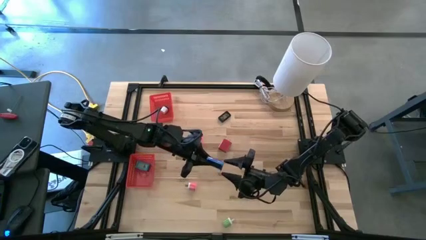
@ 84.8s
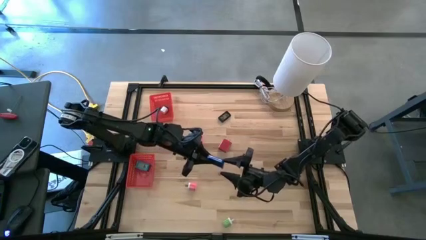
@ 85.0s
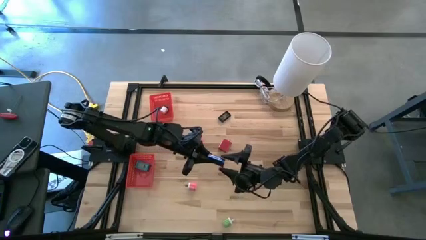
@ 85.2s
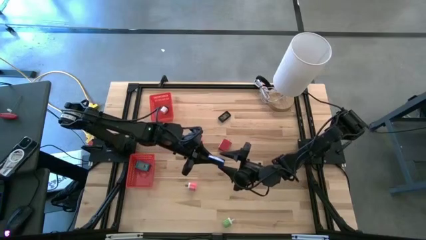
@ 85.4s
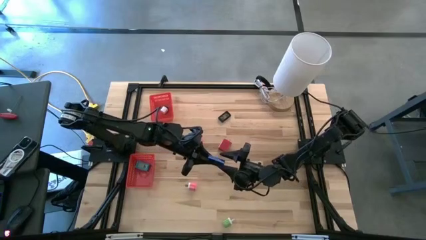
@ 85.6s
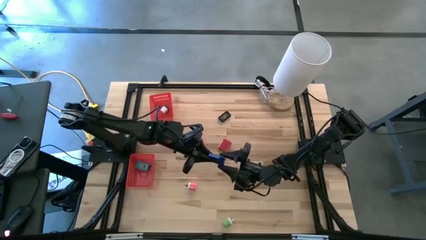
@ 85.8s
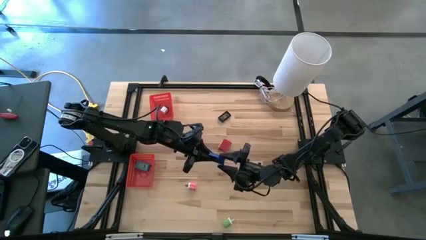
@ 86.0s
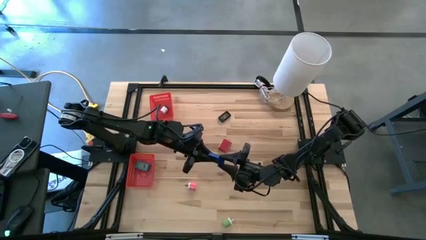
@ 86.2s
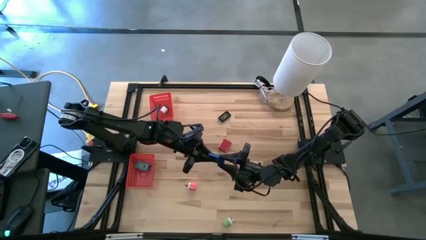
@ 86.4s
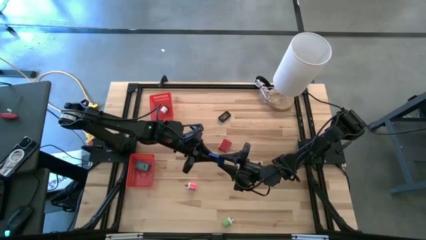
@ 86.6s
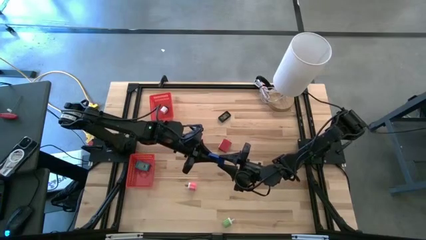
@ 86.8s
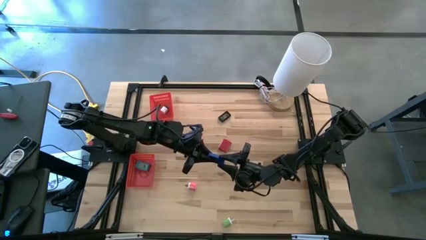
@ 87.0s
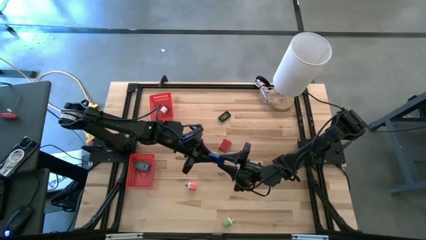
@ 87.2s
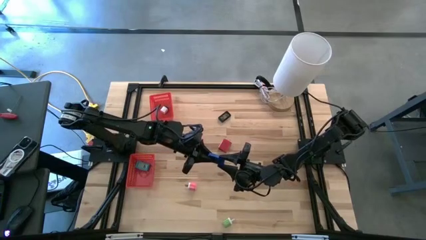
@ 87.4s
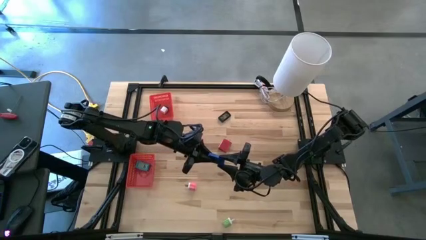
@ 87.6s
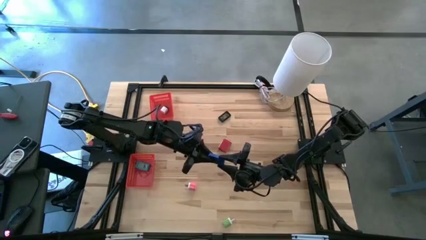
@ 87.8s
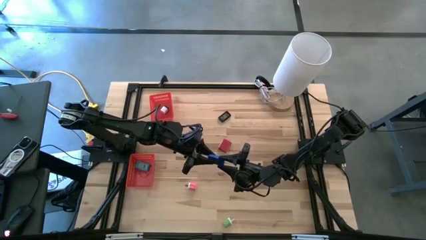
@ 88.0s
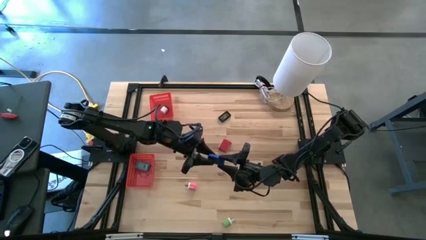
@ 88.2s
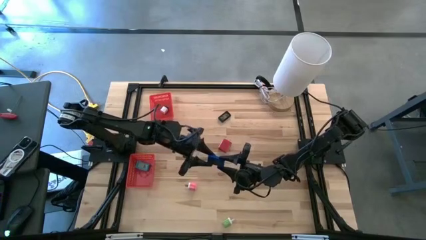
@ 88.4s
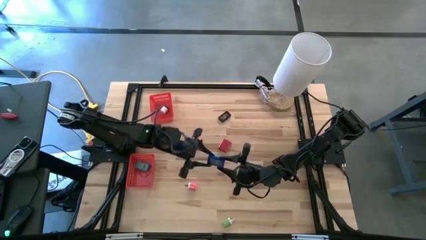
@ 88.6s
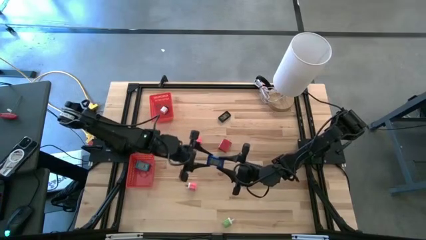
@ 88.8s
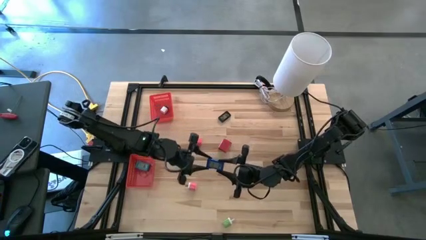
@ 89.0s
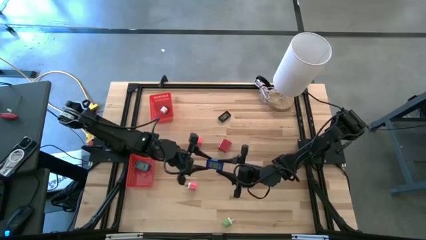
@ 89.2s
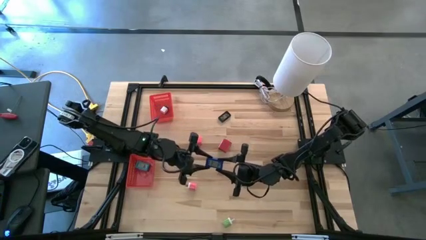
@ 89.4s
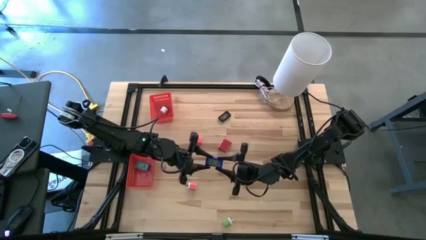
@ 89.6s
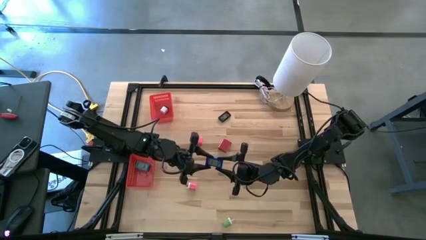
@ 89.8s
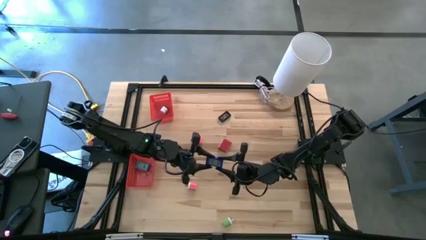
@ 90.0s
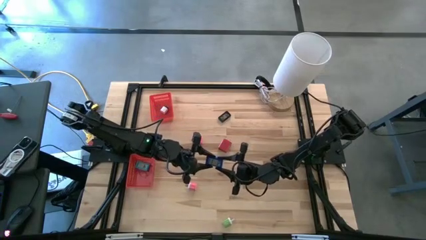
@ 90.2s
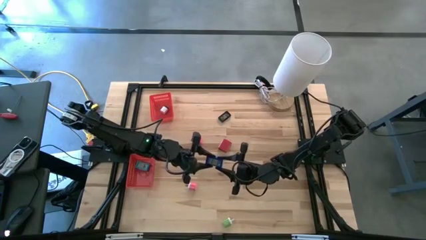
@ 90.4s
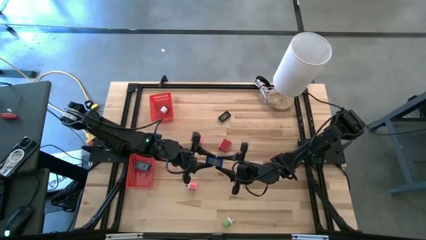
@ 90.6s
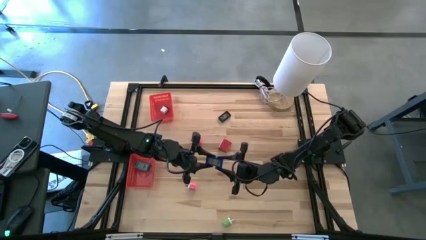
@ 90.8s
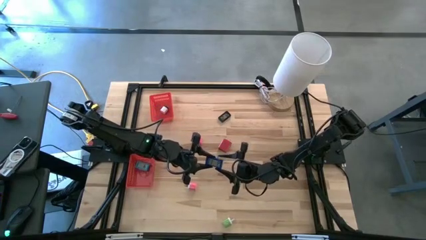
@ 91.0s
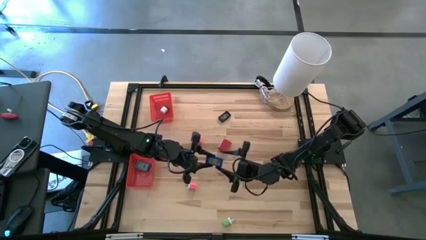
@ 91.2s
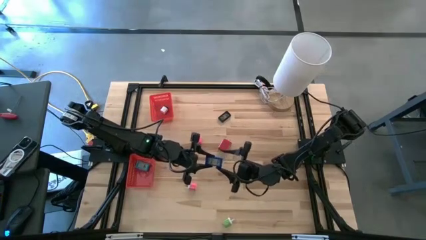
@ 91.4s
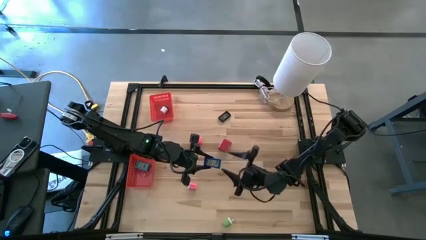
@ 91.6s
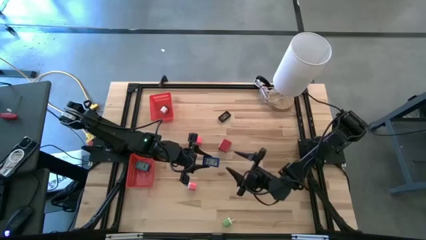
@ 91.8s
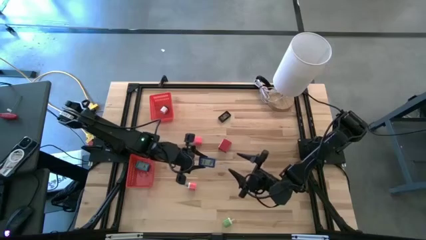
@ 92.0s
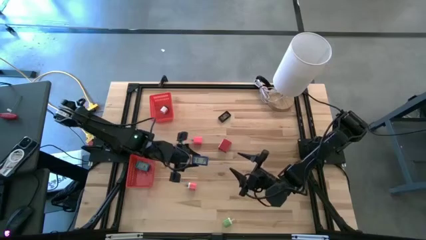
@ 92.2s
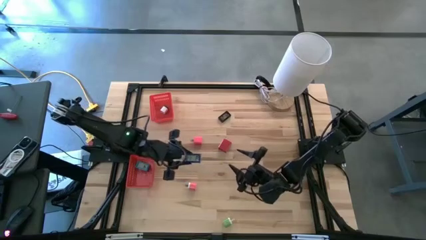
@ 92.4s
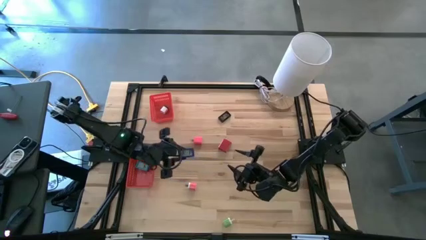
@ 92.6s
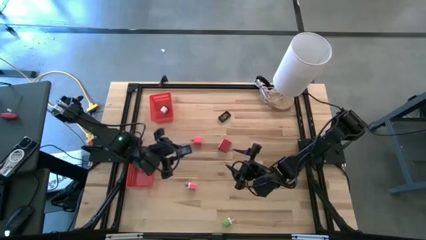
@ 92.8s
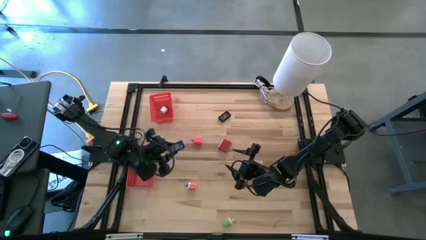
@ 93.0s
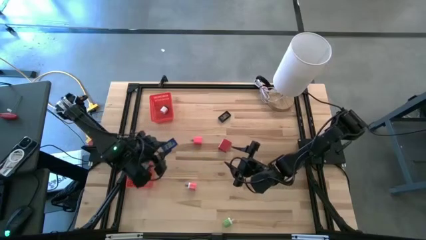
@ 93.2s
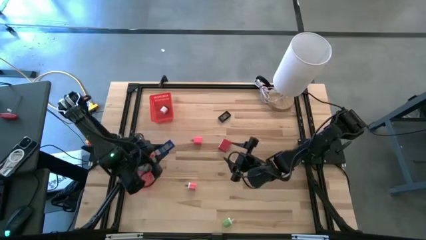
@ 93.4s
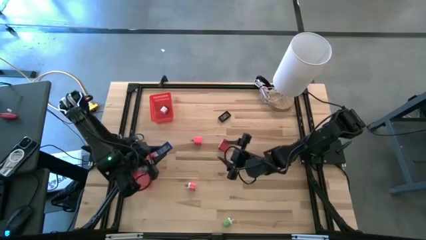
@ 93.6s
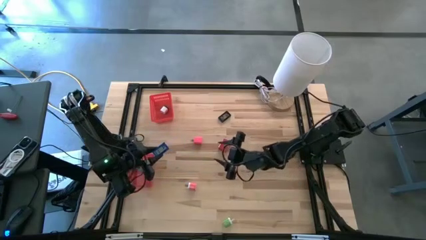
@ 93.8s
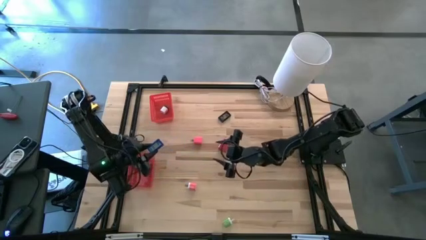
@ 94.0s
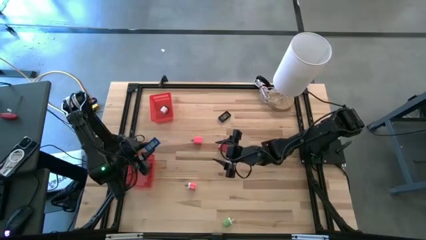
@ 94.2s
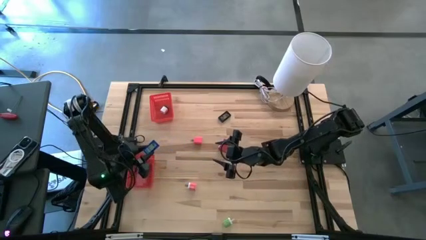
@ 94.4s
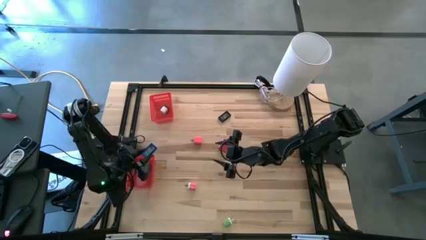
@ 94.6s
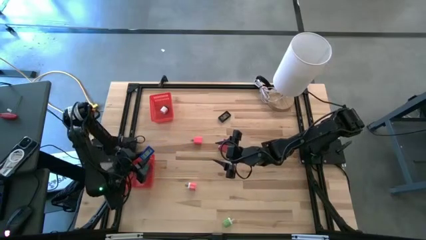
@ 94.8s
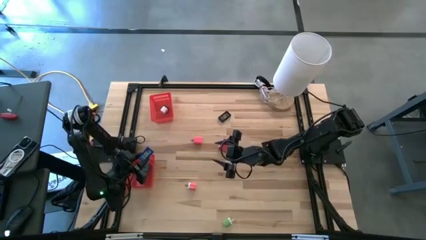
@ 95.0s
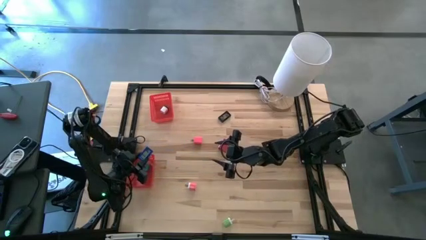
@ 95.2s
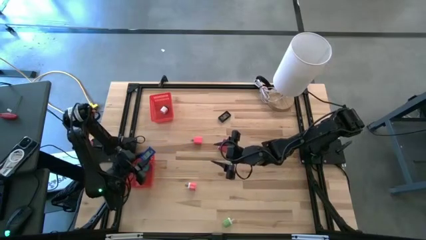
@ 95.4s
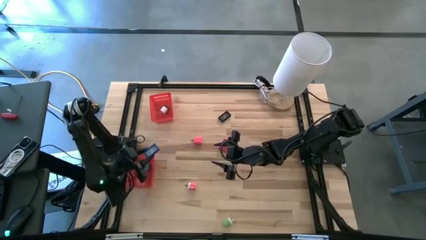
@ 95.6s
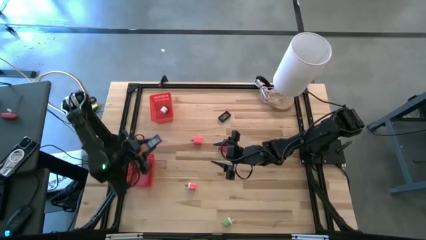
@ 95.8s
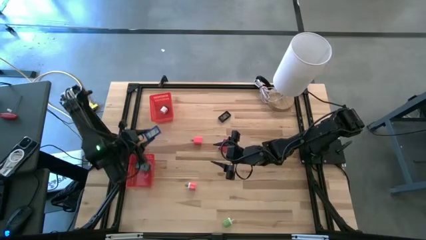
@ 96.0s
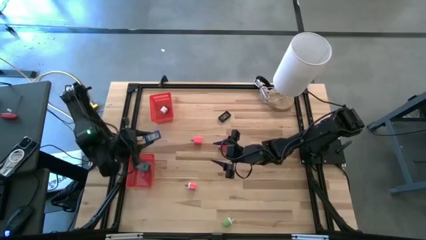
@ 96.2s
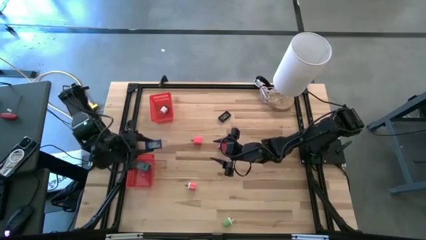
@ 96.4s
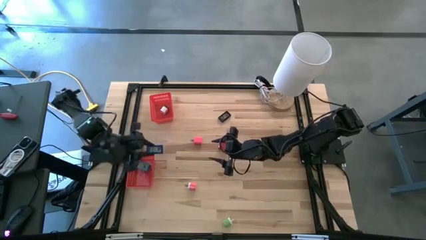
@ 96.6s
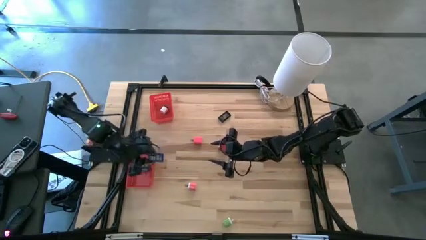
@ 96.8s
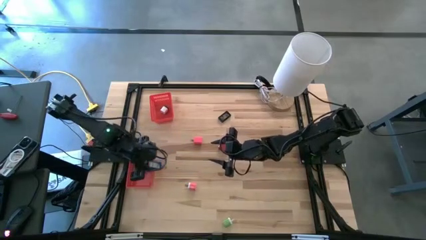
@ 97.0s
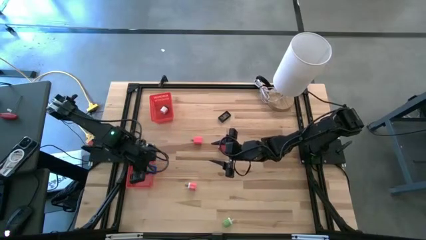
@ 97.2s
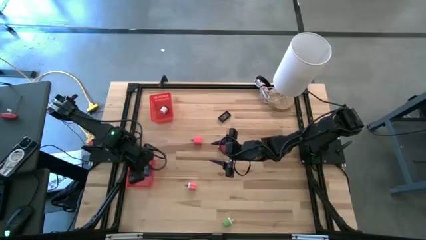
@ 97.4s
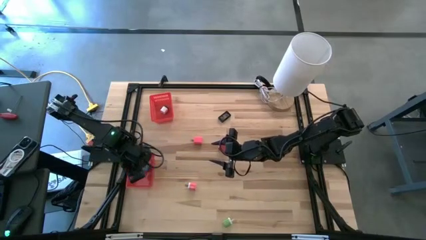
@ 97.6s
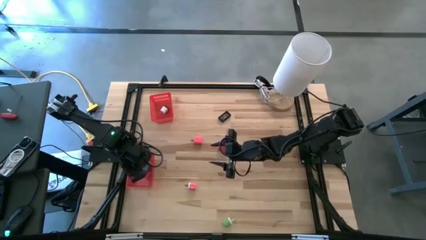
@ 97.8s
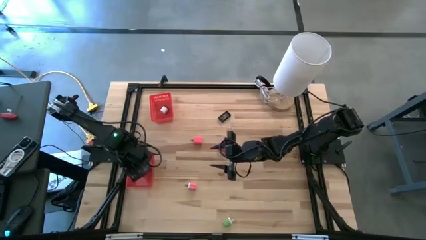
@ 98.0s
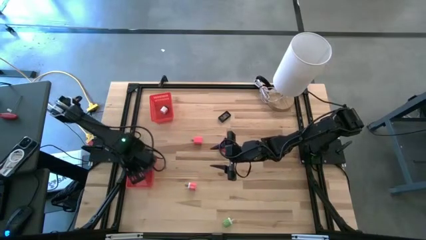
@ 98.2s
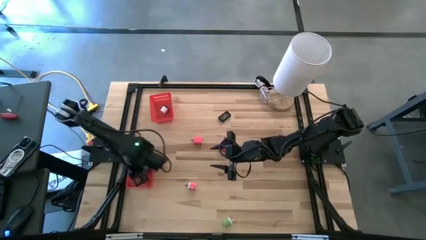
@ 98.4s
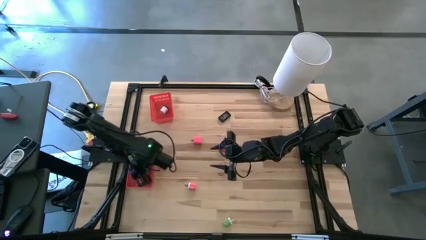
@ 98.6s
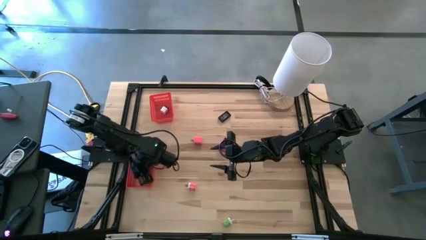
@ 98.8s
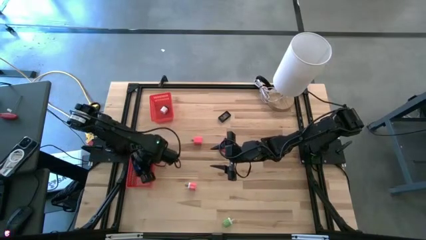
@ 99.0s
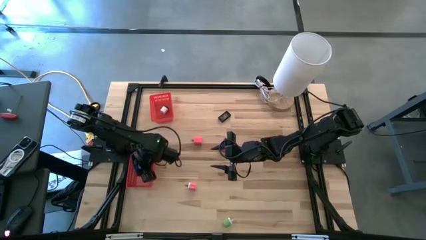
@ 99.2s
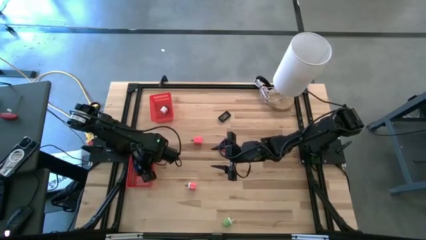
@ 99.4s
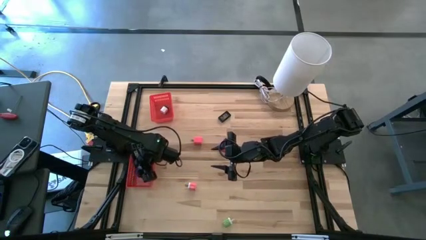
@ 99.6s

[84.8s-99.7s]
Task: Pick & Place Office items
Put the blue digital clock into the bottom red bin
